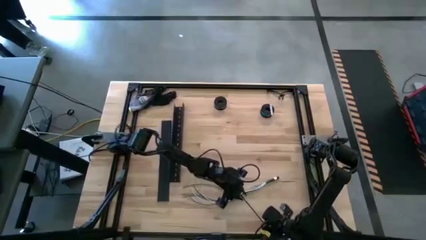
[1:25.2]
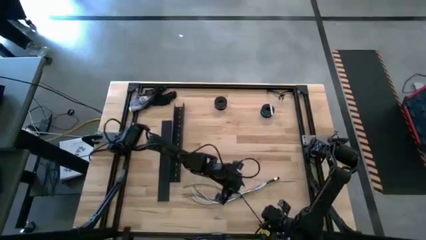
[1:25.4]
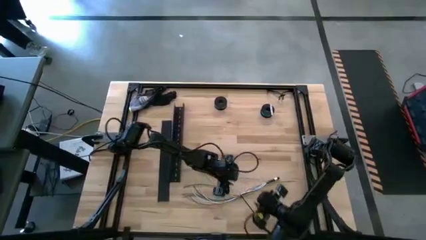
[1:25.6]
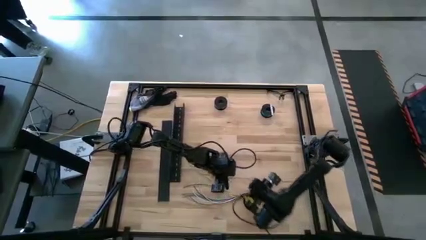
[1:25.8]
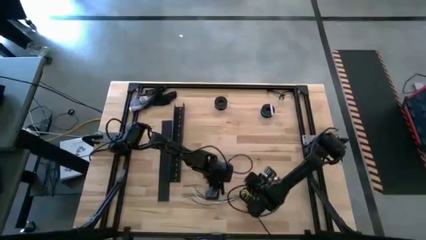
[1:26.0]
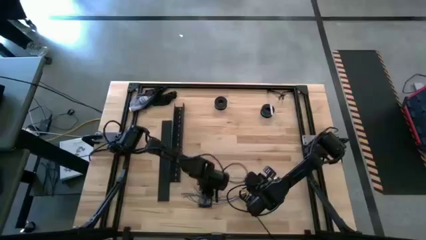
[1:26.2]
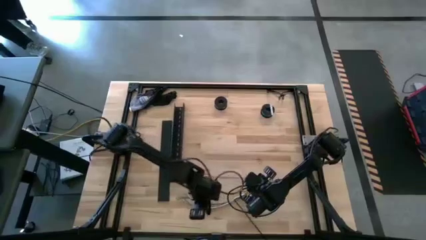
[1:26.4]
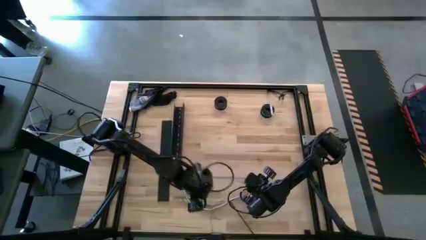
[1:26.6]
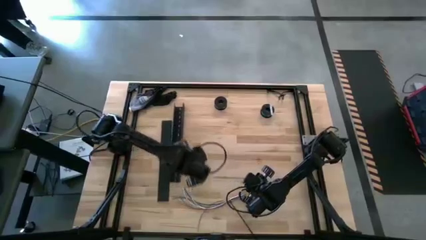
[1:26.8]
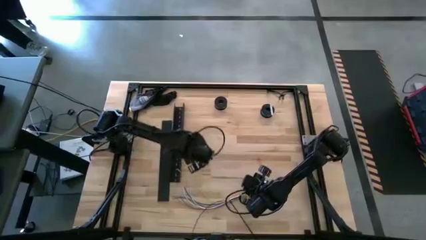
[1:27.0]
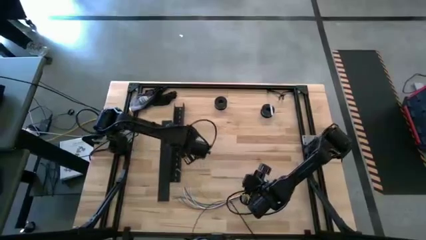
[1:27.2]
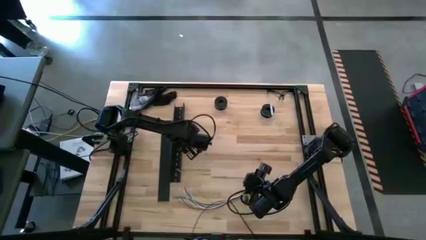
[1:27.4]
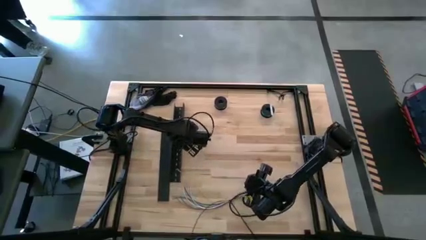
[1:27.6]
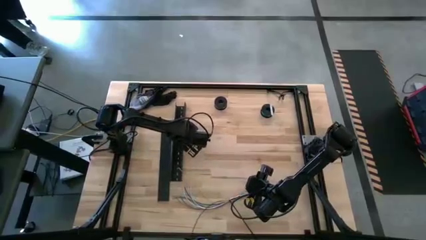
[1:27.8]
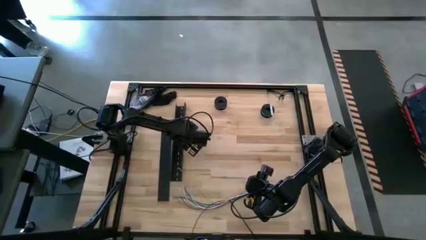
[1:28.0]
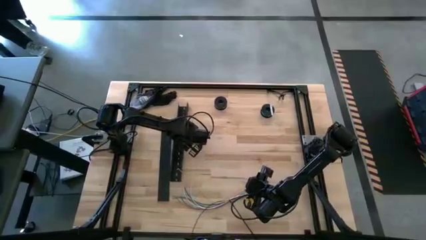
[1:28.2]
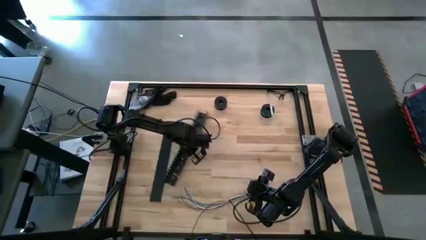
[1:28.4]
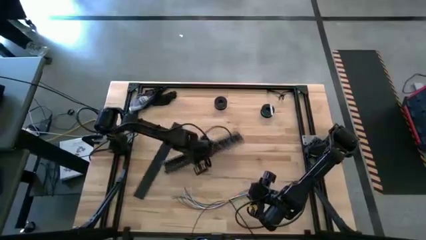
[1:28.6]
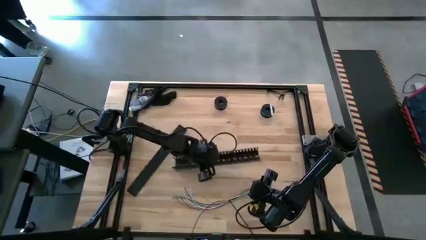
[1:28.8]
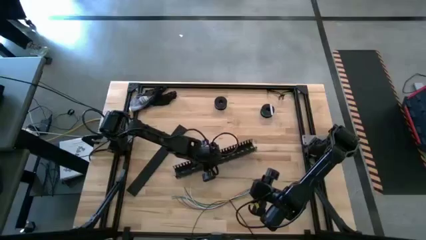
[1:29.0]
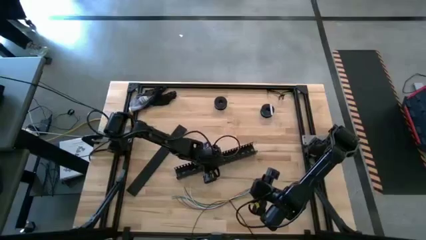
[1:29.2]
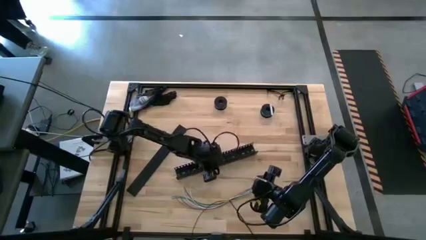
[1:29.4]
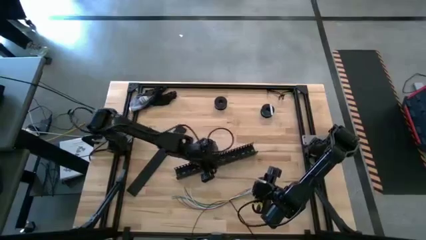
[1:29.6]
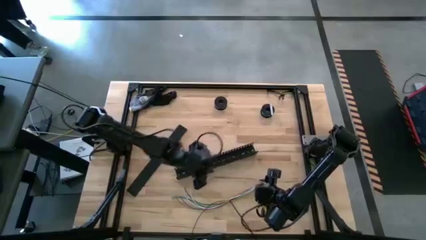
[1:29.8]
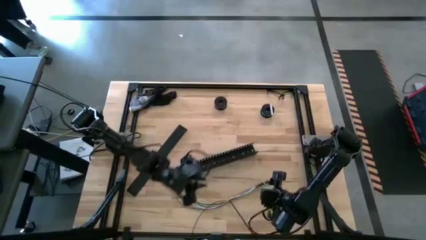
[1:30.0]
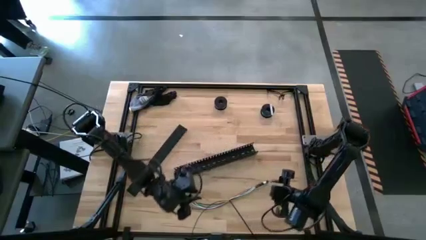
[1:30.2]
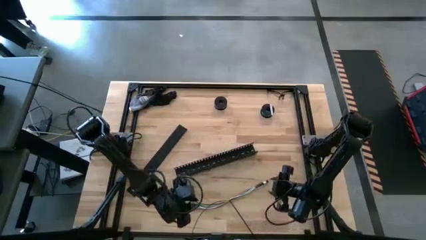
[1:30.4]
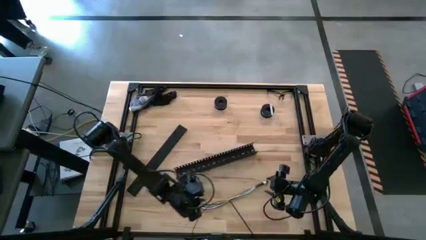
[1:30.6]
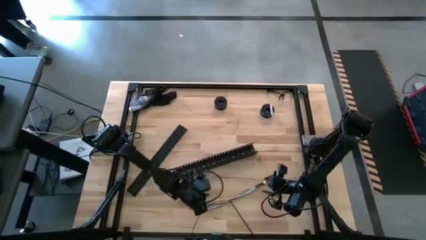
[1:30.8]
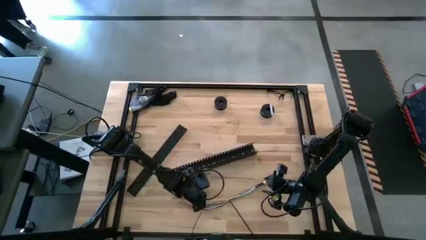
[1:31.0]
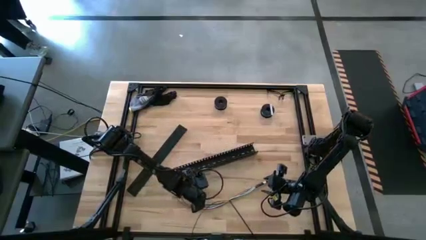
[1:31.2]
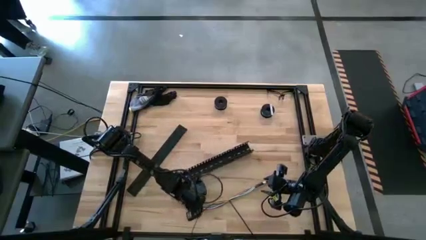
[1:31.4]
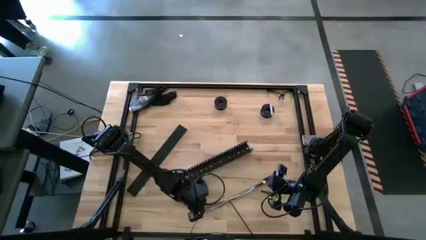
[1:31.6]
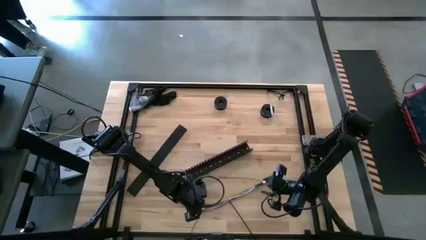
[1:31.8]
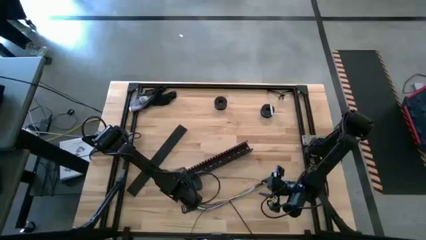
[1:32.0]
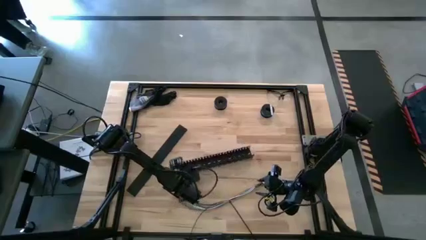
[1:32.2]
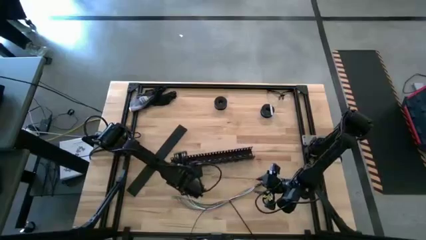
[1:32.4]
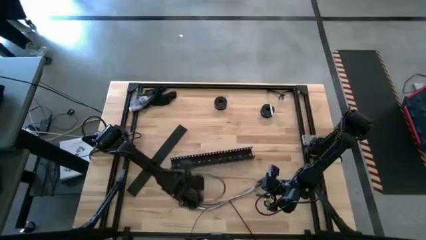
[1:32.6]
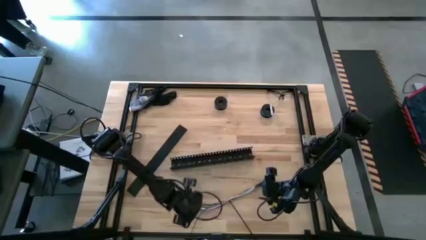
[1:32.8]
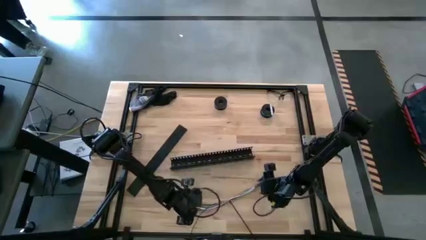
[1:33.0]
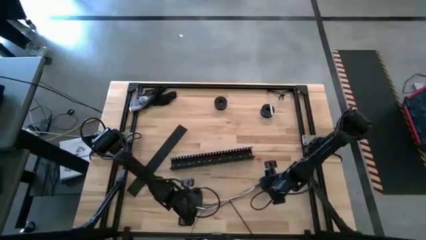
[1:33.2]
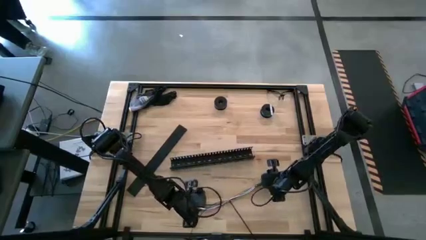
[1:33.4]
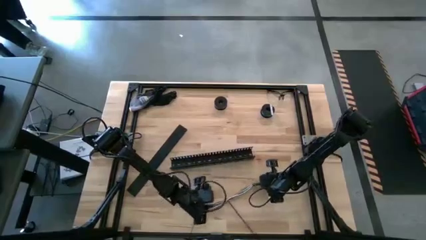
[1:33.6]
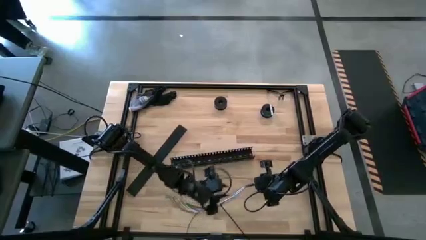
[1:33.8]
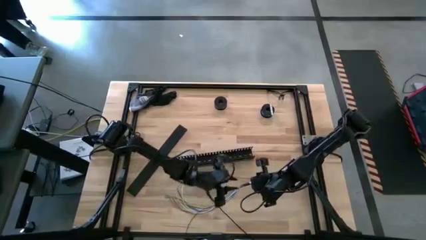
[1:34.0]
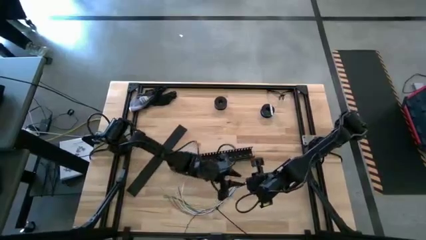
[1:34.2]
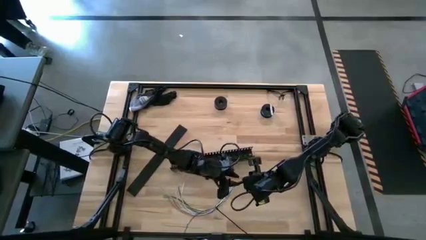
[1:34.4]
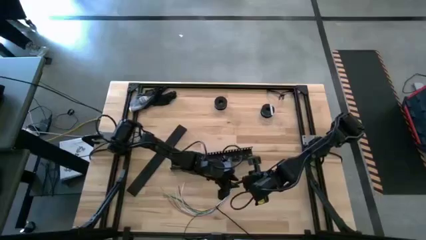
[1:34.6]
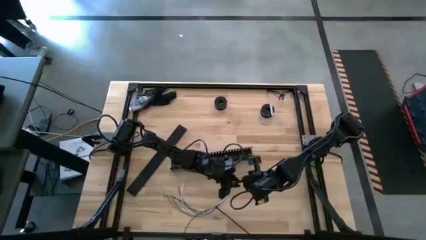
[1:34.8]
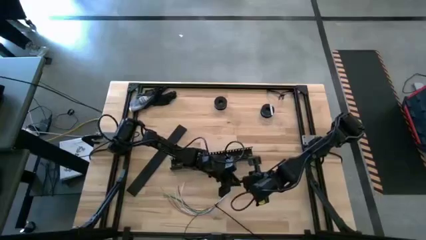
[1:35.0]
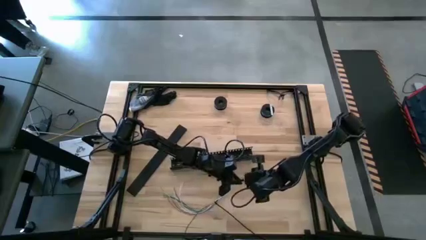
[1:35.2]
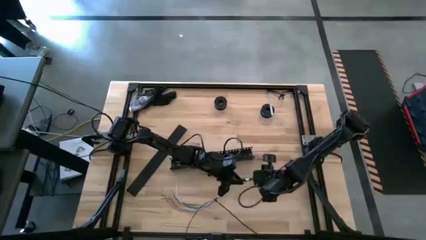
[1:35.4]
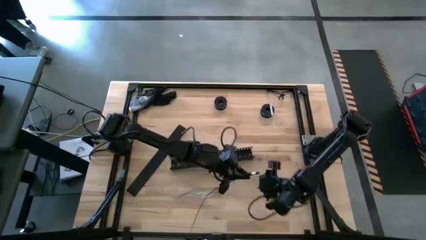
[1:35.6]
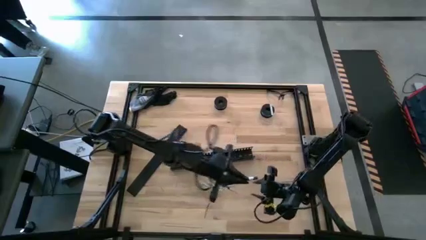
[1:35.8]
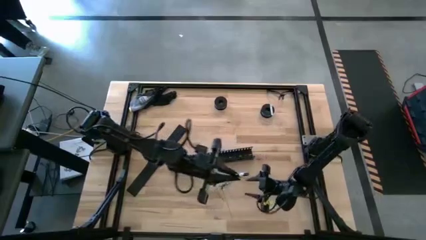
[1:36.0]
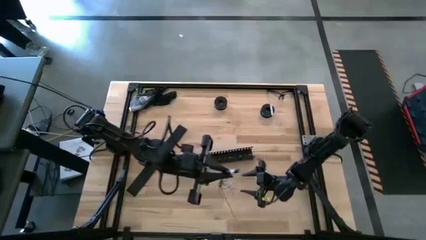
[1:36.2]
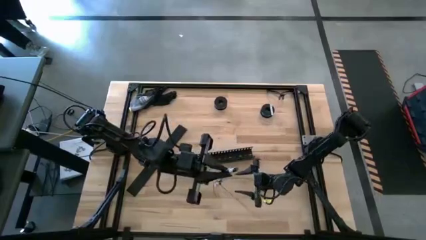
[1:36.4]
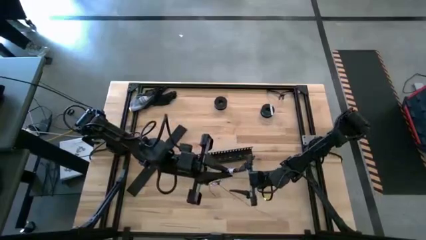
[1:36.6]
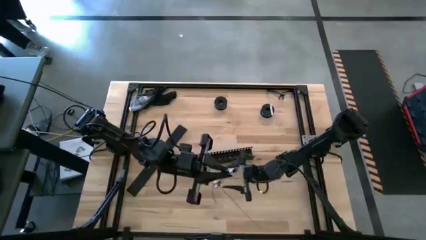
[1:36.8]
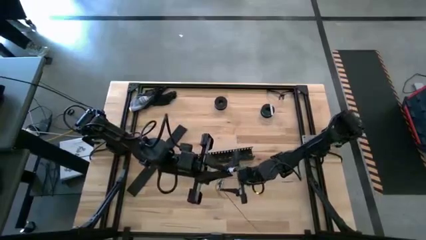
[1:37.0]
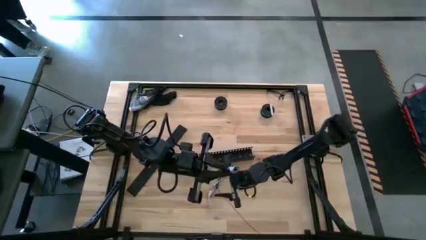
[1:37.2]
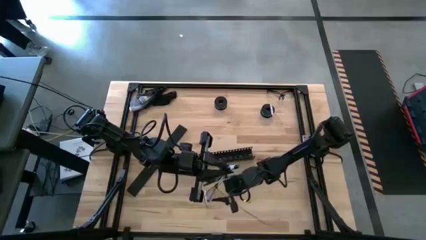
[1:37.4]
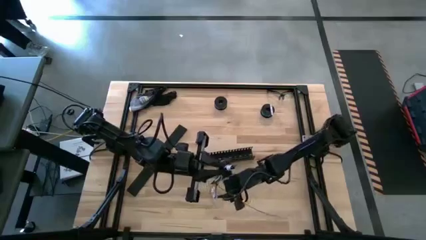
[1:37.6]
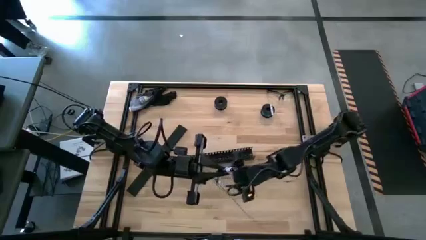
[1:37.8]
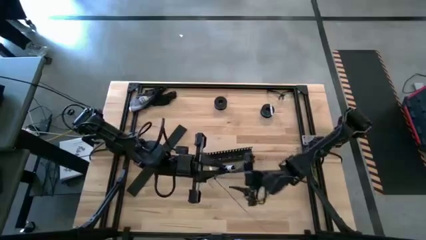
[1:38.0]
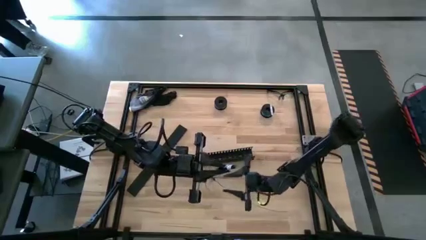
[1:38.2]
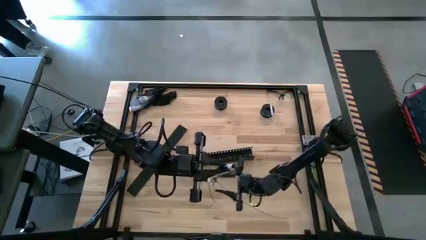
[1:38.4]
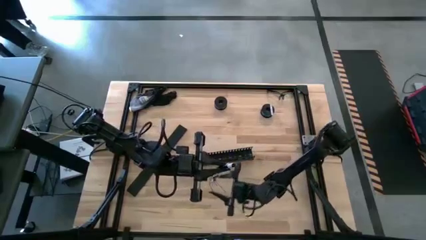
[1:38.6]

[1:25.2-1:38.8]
Task: Ziptie cables
Put the zip-tied cables into the black cable duct
